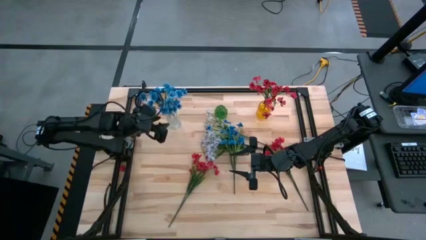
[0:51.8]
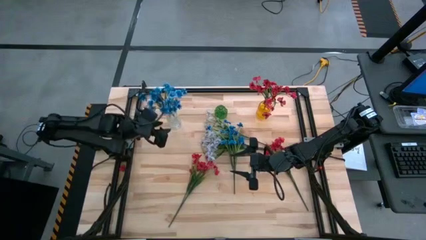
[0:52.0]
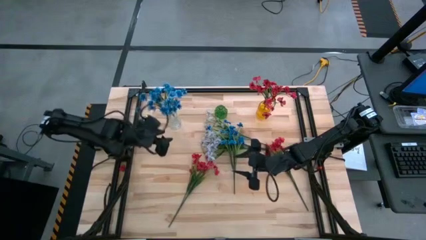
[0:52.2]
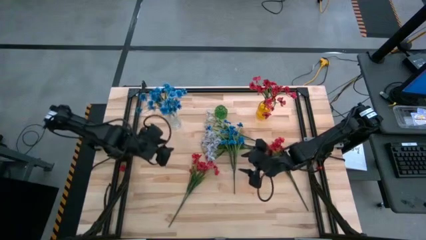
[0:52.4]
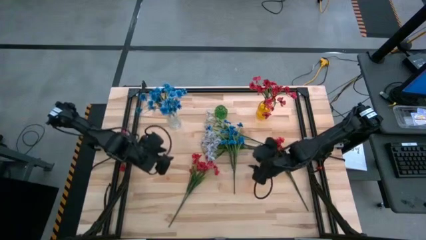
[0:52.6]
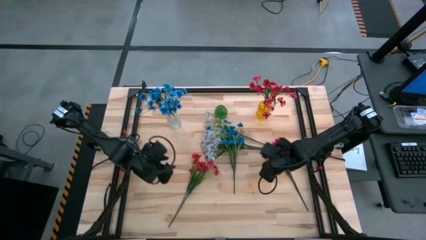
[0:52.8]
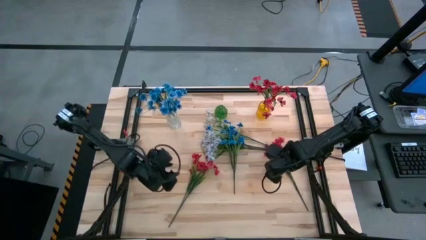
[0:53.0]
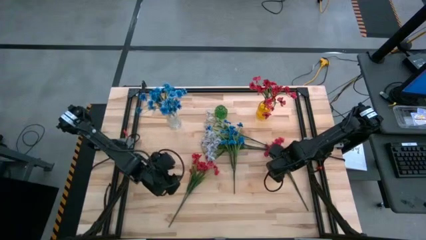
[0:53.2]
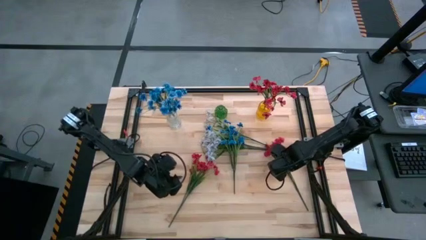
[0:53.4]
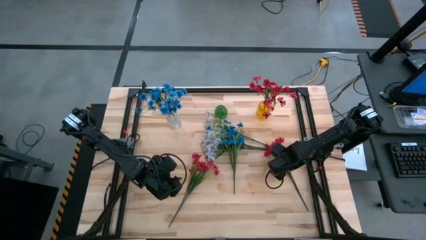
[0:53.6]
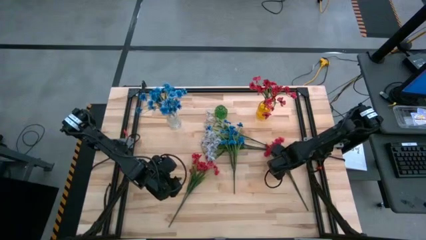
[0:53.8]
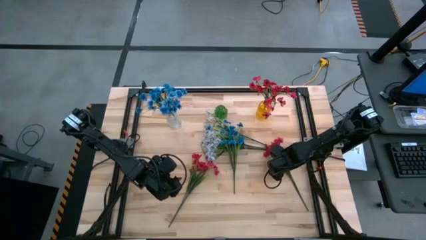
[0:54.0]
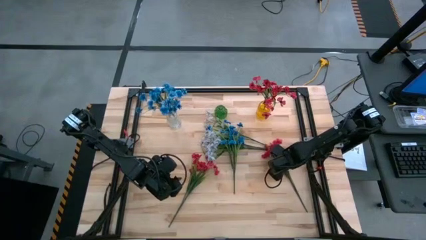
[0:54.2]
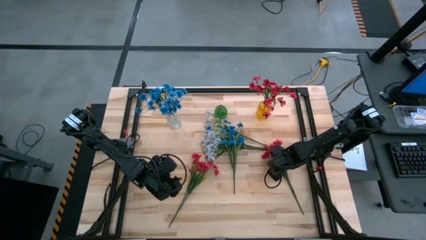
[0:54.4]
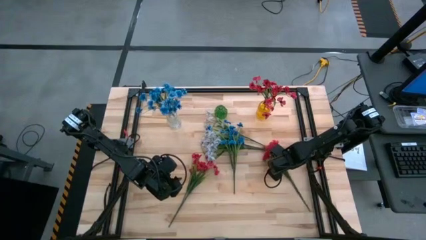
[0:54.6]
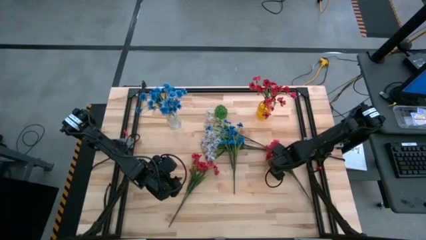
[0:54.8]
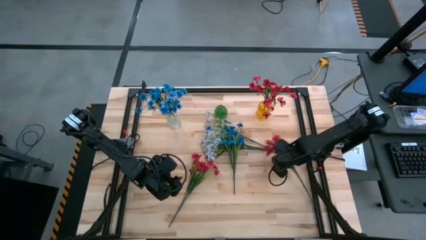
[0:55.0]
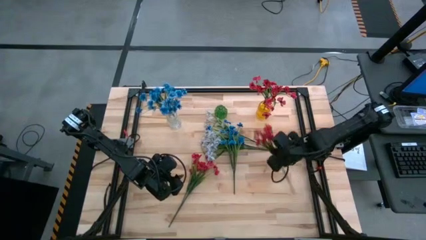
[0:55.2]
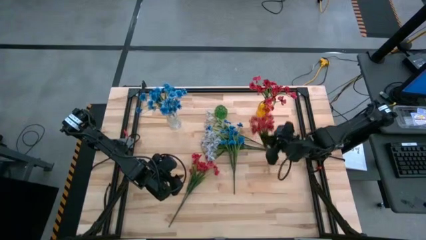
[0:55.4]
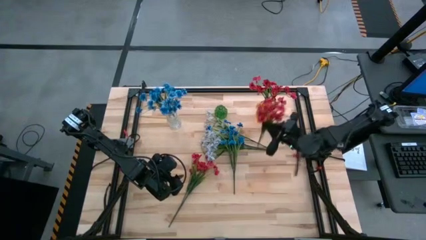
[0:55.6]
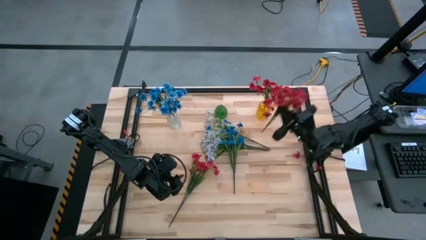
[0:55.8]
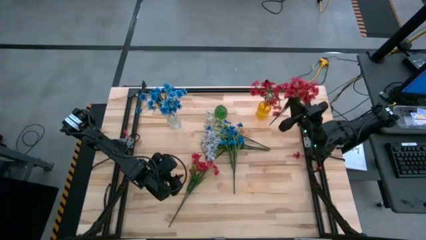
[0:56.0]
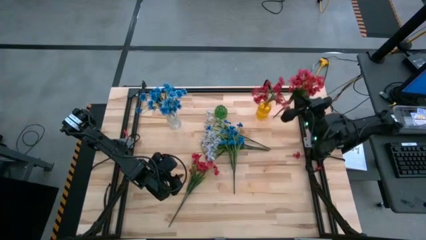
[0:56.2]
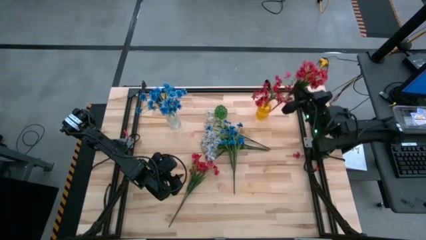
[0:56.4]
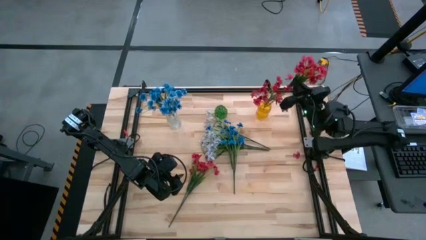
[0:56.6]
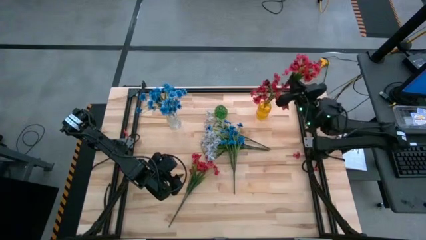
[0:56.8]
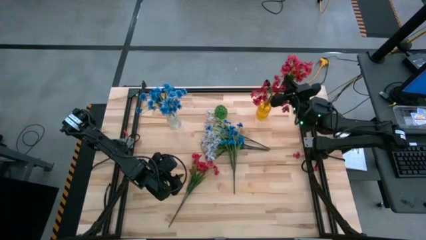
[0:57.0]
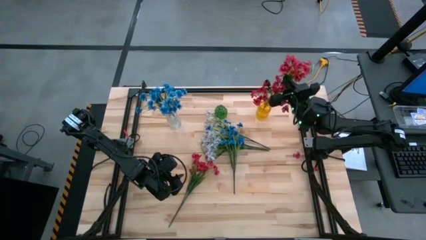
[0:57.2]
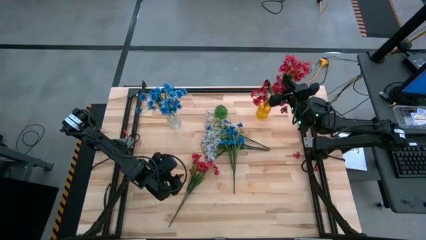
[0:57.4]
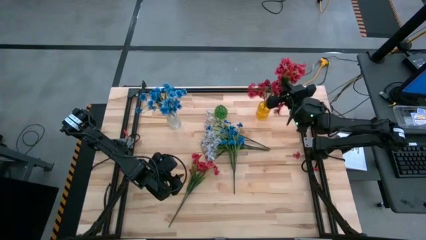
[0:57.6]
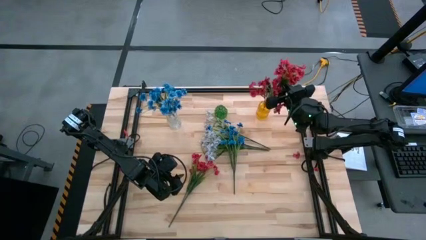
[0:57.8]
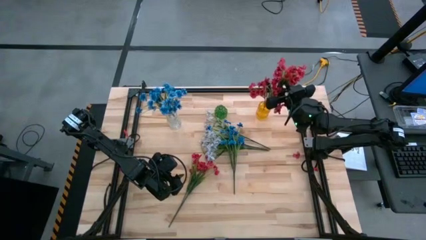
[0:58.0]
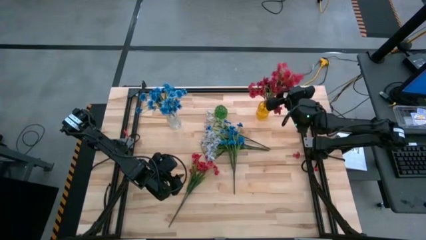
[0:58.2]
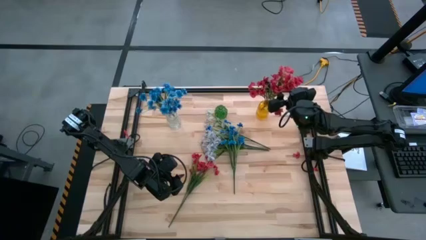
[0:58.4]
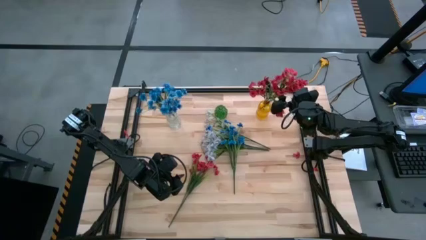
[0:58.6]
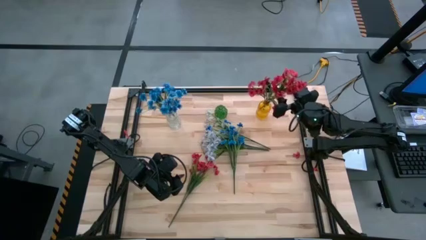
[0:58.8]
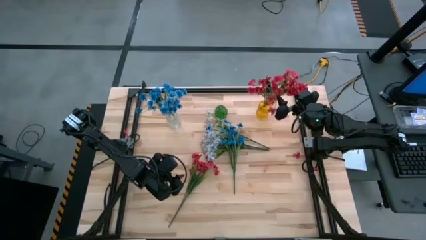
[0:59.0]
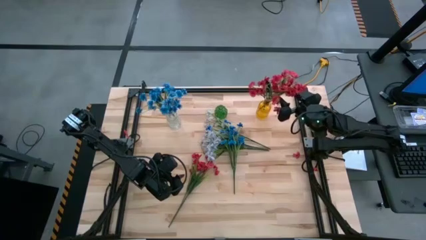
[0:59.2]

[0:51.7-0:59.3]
Task: Sort flowers into vase by color
Put the red flowers into the yellow vase

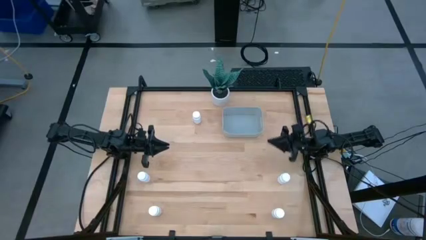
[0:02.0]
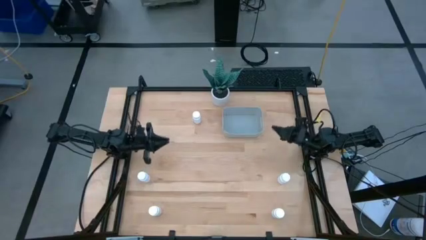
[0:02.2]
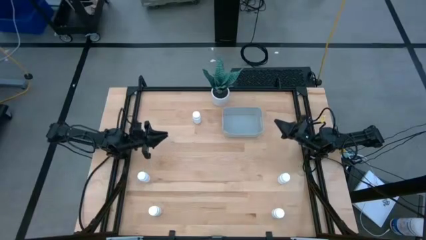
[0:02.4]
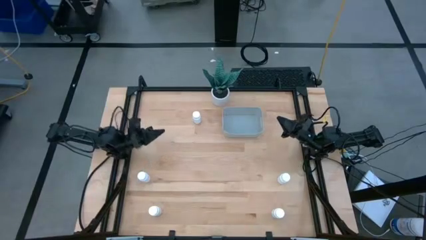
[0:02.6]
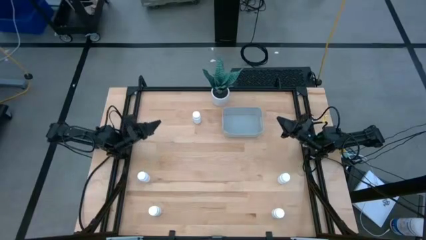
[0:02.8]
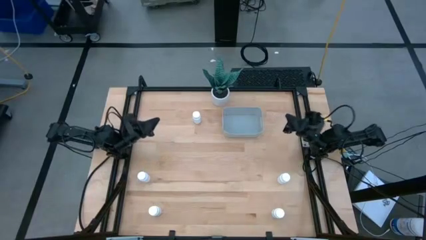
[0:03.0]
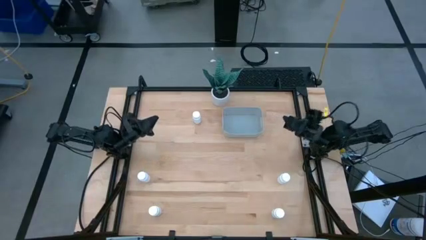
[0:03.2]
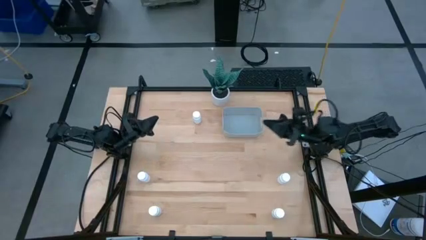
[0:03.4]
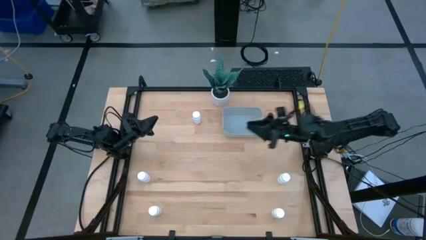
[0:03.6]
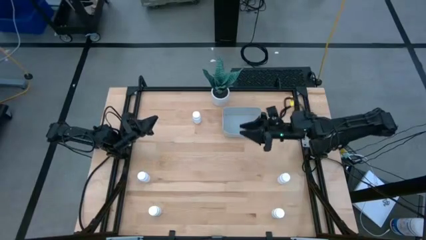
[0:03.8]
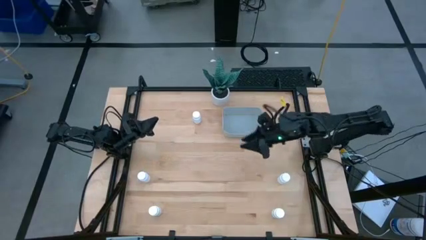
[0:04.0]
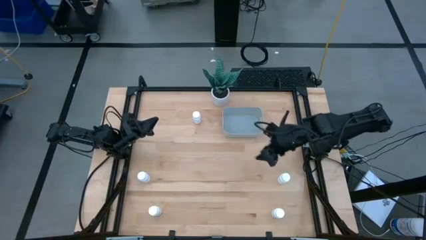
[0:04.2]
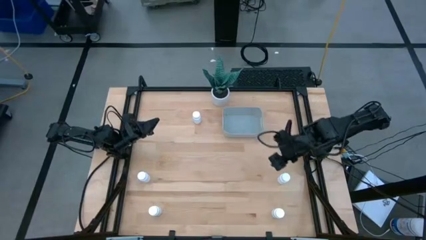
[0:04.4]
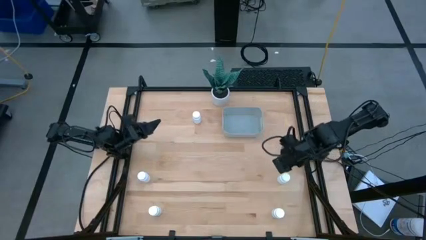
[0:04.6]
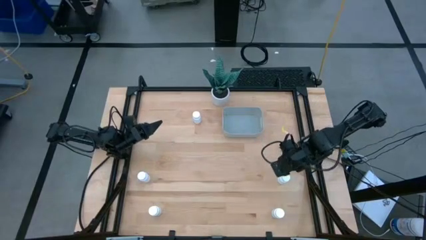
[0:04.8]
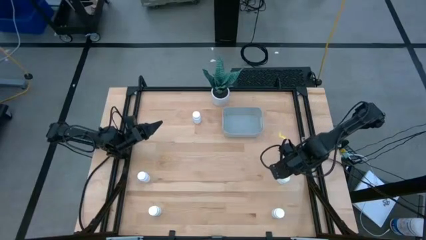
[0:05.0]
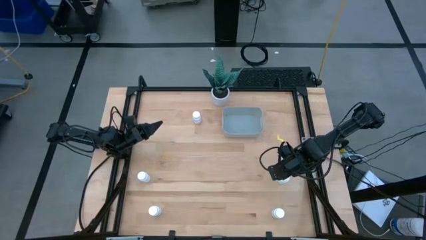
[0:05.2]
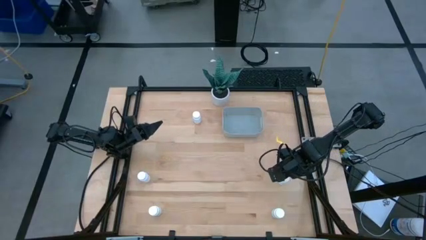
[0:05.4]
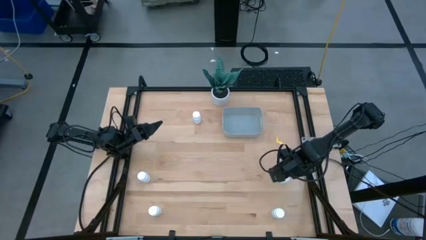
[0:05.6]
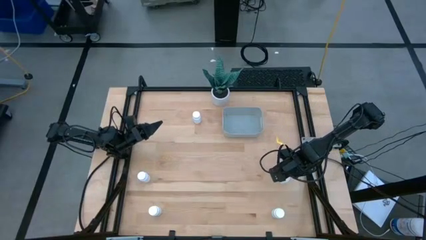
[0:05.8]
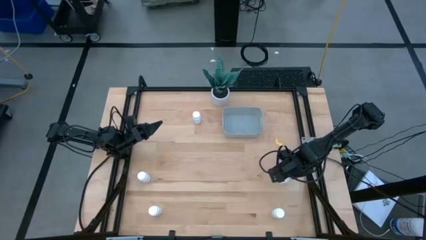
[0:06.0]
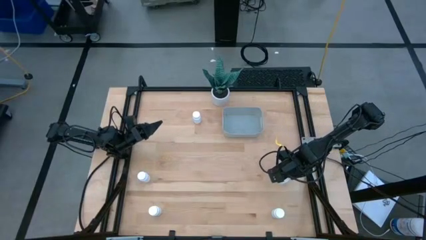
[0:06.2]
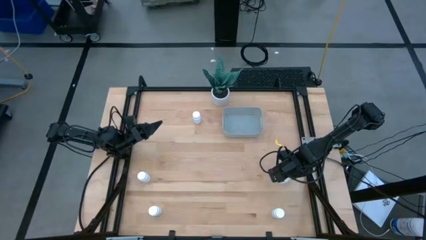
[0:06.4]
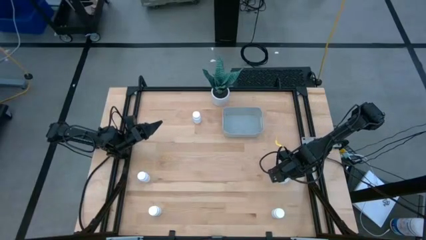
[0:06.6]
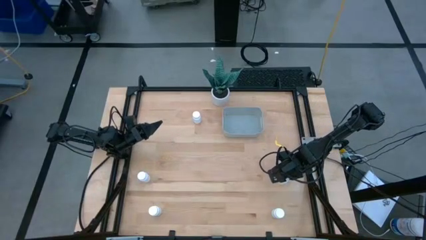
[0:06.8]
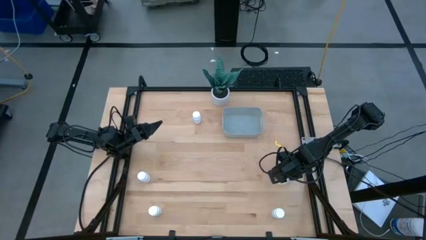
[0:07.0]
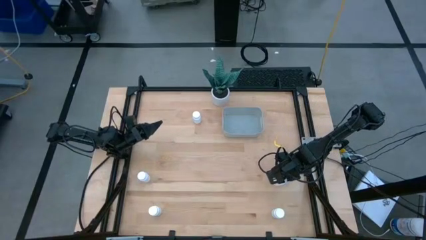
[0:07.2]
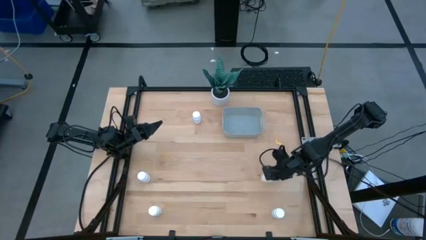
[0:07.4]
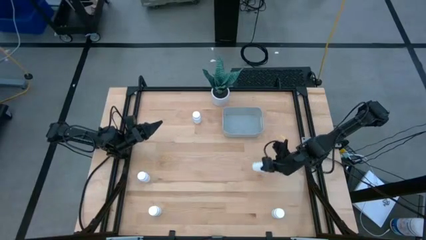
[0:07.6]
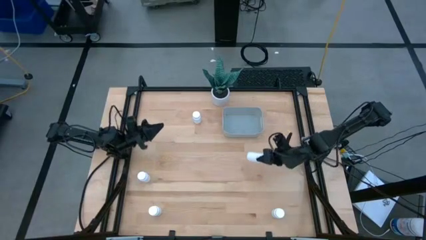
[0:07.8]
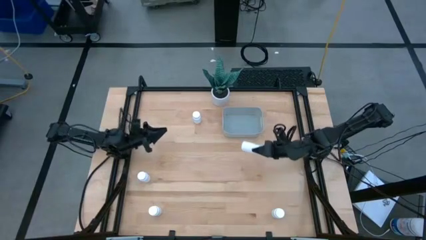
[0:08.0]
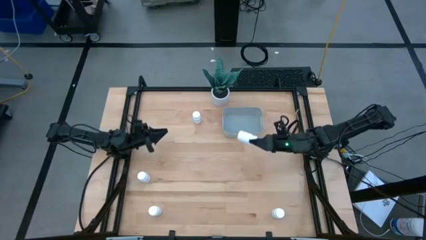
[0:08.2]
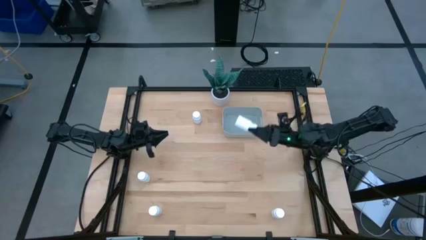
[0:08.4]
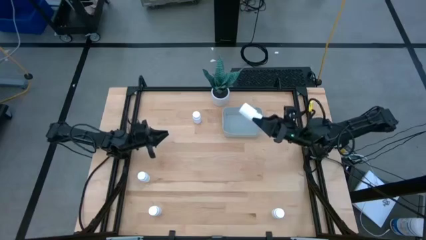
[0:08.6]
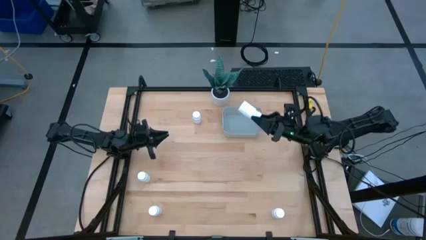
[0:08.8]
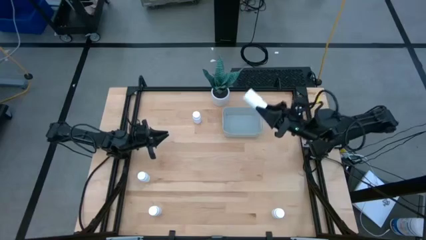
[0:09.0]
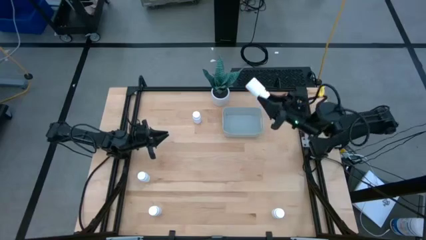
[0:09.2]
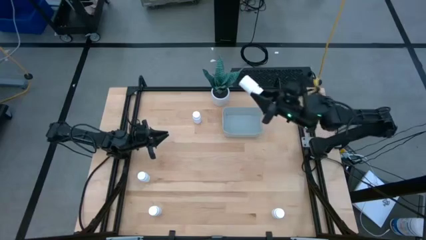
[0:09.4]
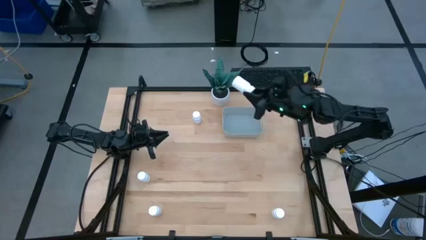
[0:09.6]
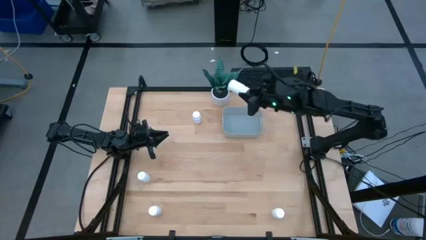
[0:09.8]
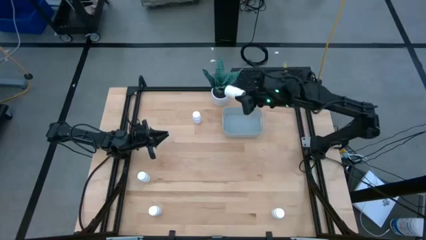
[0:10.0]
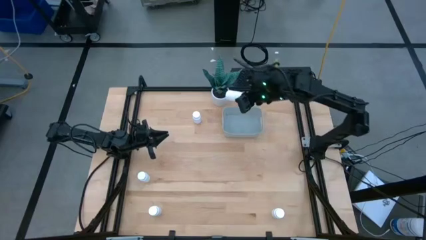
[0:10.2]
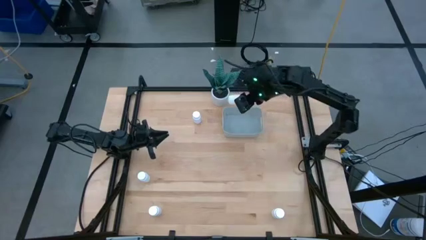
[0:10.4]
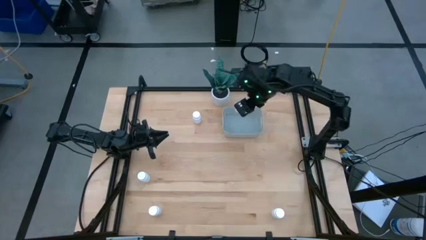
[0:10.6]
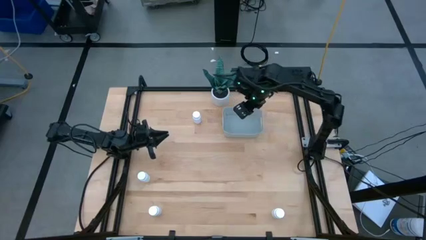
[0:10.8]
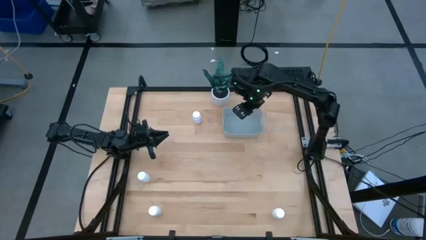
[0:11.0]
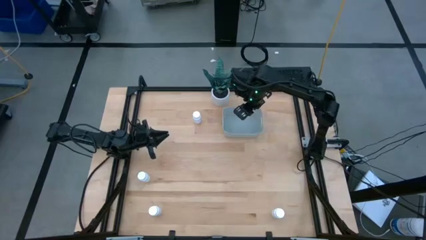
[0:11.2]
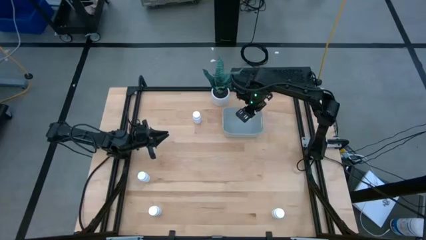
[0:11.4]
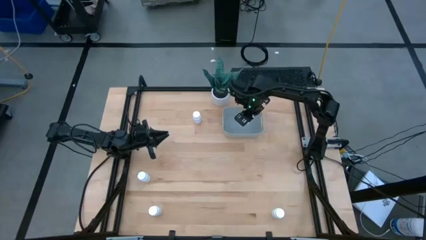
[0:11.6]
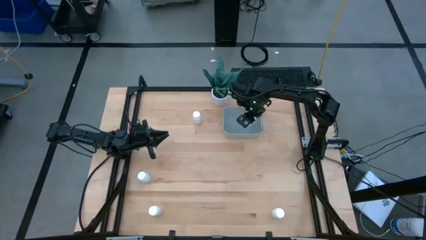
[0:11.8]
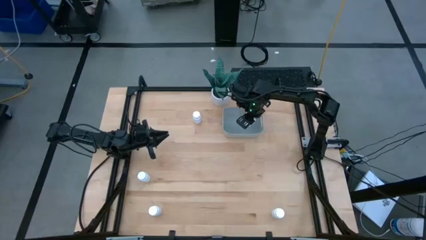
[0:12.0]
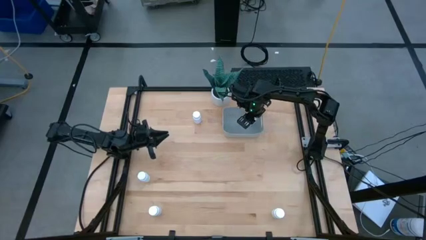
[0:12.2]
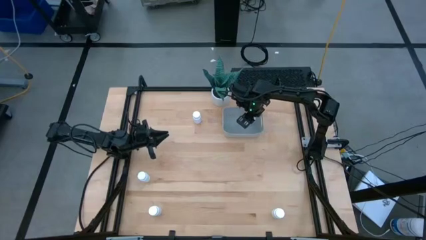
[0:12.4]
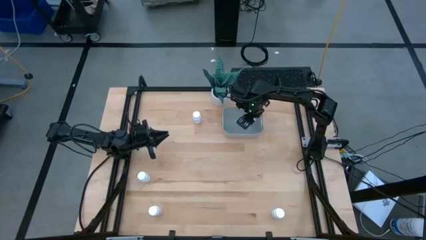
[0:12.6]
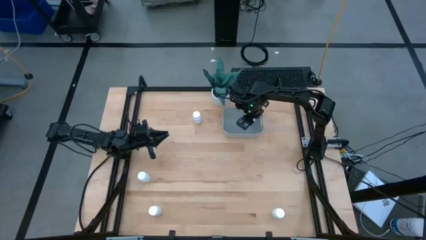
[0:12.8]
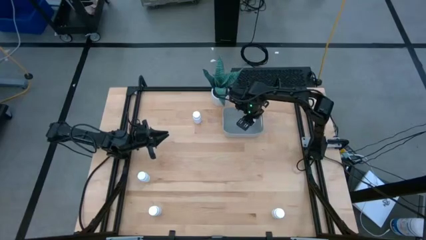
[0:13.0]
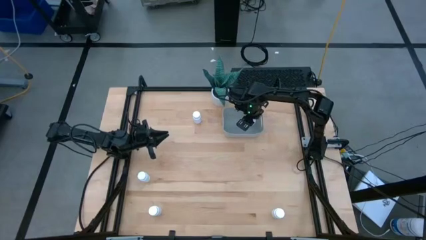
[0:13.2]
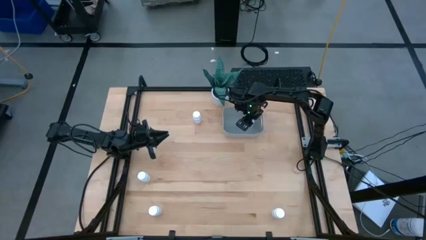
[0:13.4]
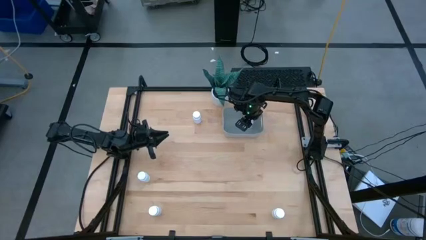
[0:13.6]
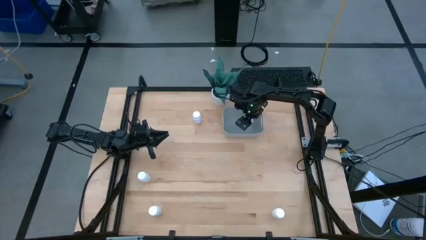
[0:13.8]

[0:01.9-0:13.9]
Task: Pick and place pill bottles into a basket
Put the white pill bottle into the gray bin
